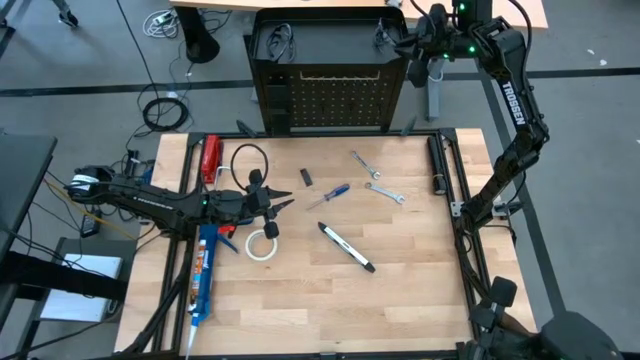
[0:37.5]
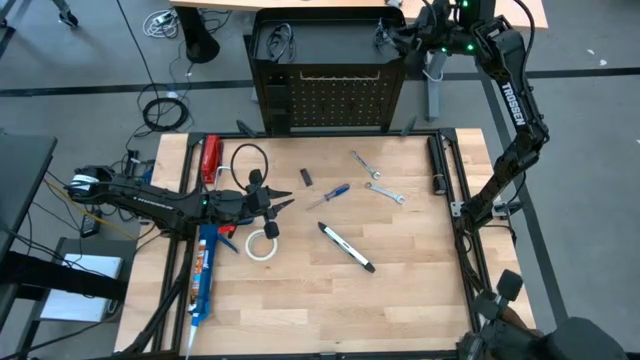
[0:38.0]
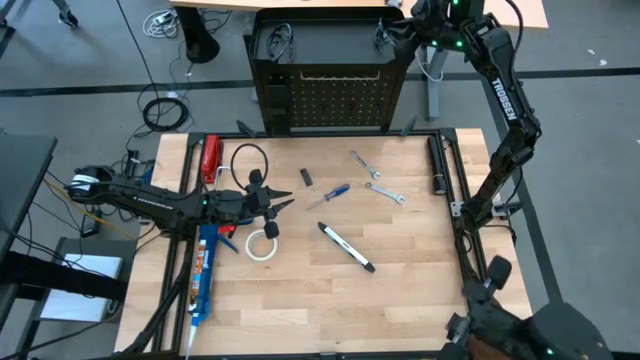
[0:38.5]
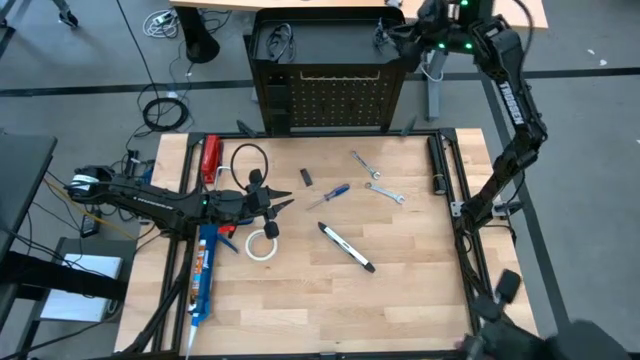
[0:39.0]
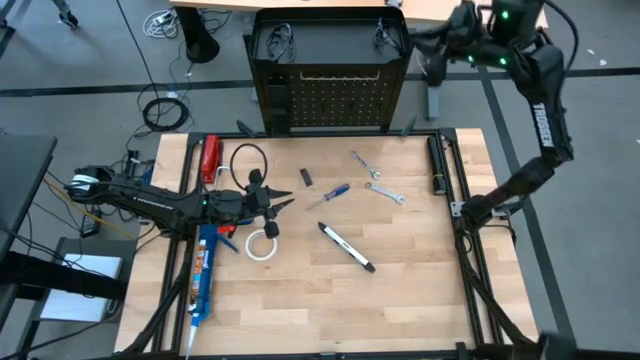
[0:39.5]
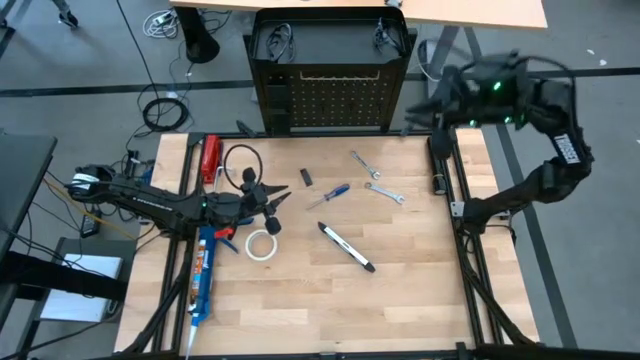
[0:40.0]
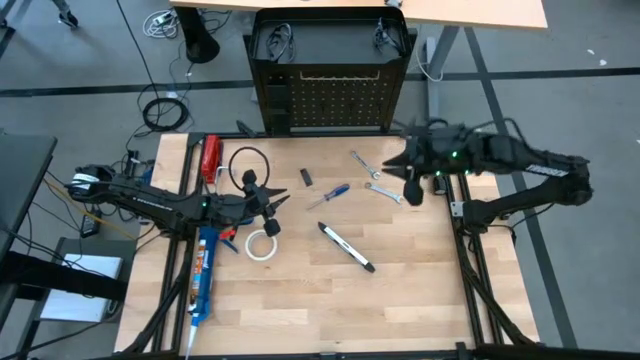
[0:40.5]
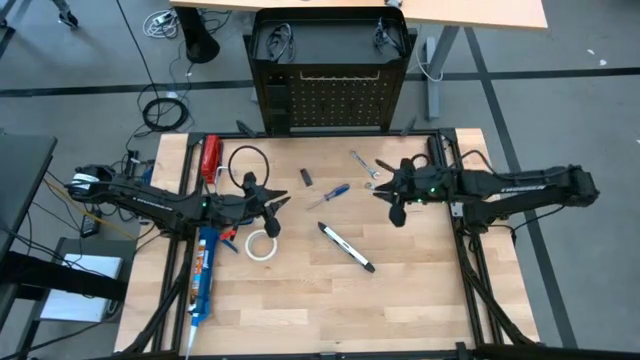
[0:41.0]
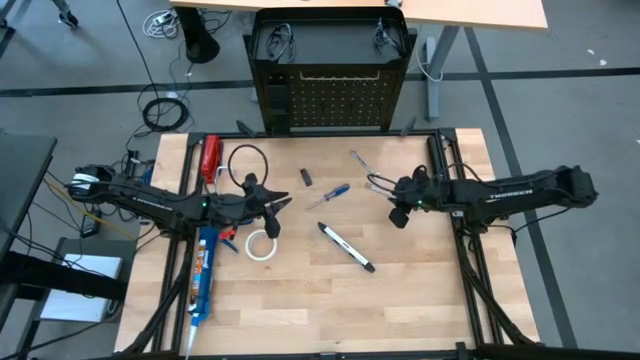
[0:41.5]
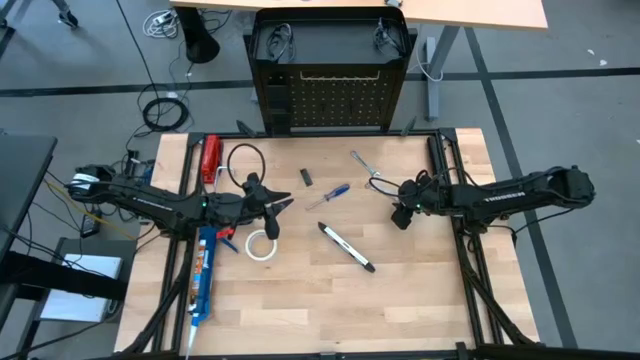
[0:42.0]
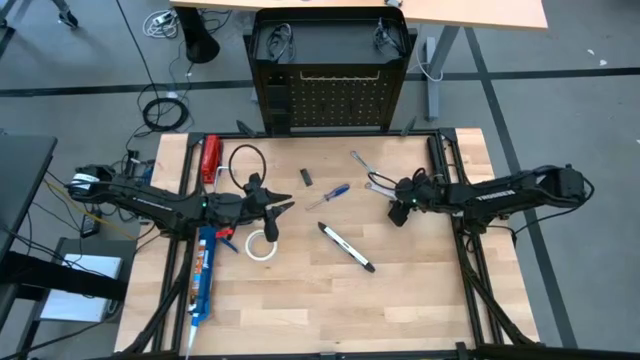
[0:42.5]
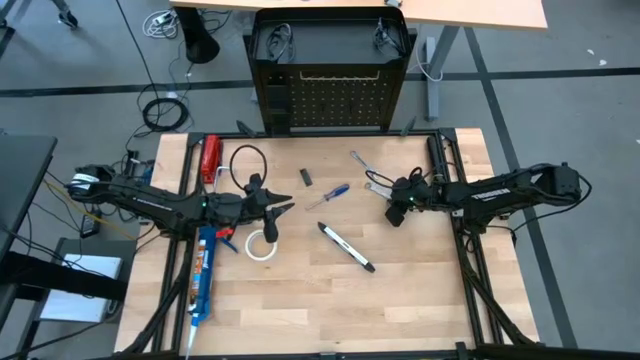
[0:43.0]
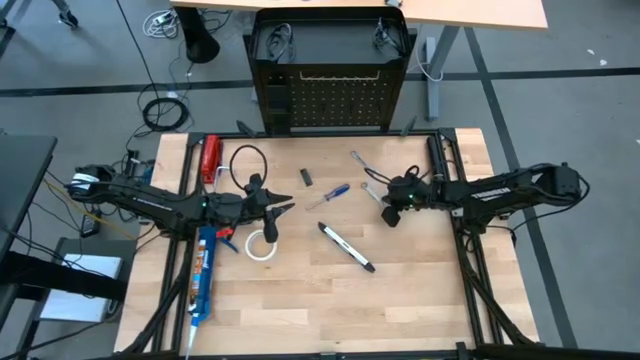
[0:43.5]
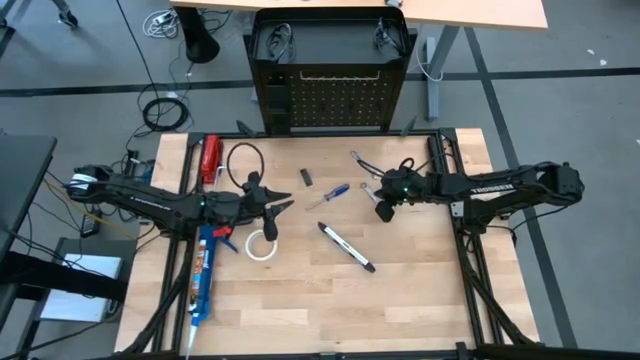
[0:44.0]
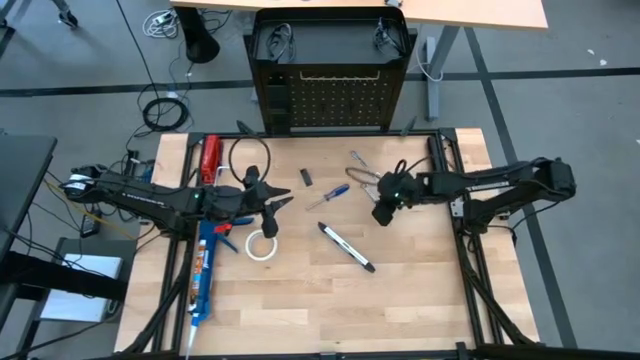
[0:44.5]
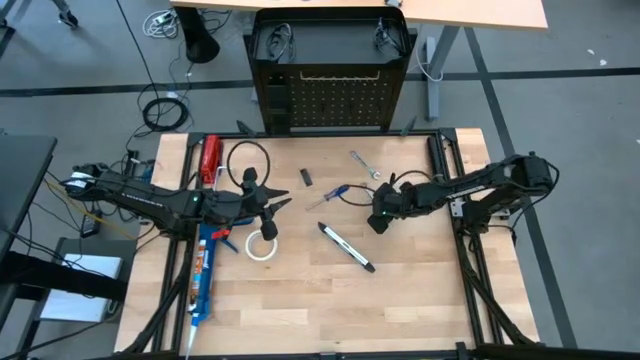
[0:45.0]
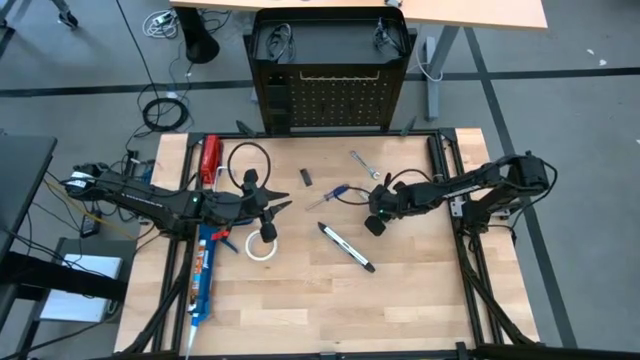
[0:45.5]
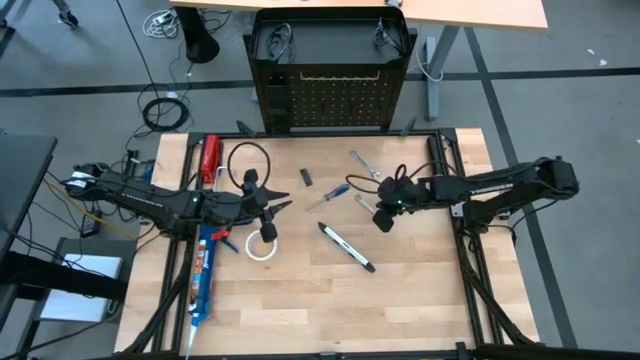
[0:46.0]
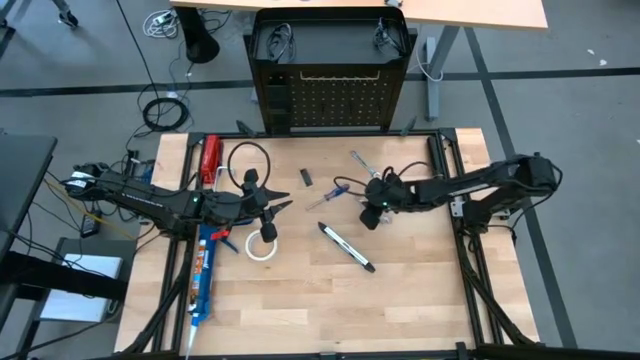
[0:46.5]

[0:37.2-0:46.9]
Task: Hang tools onto peg board
Hang the bottom wrench onto the black pegboard

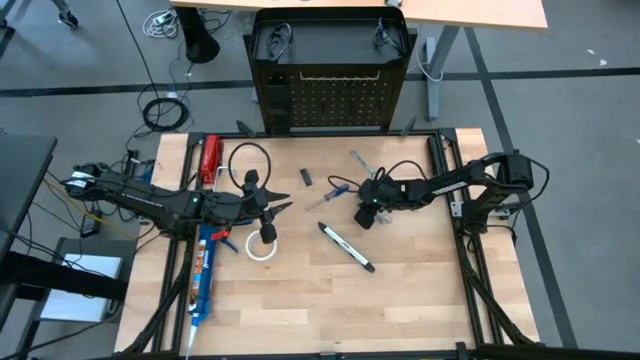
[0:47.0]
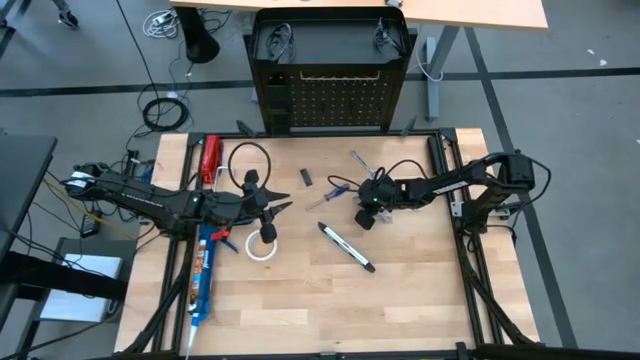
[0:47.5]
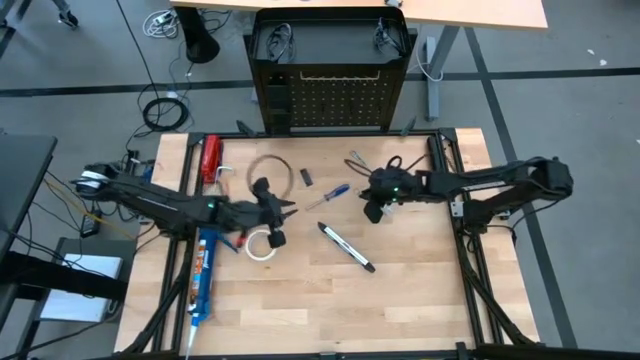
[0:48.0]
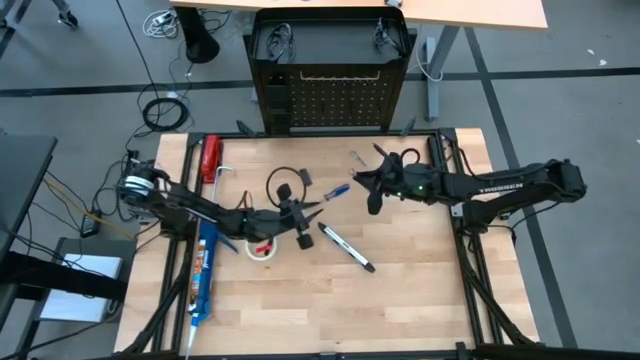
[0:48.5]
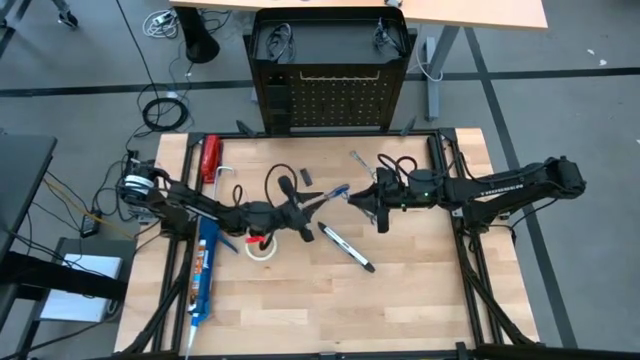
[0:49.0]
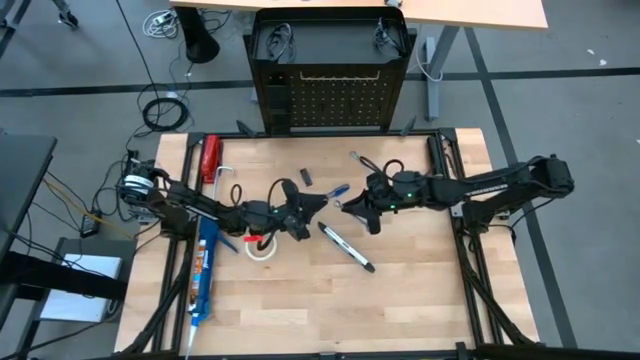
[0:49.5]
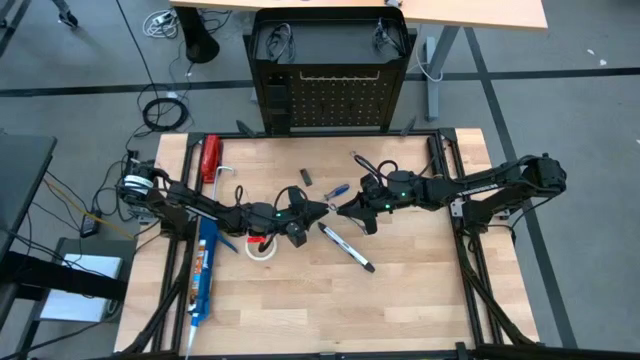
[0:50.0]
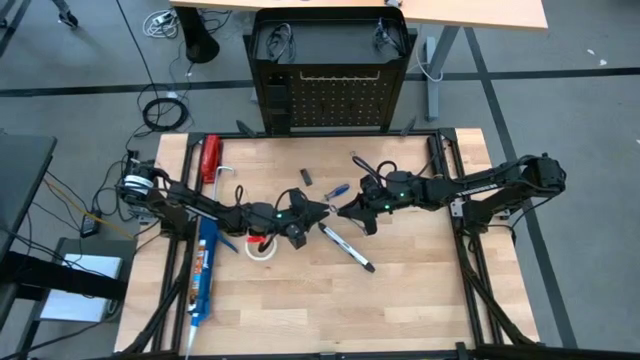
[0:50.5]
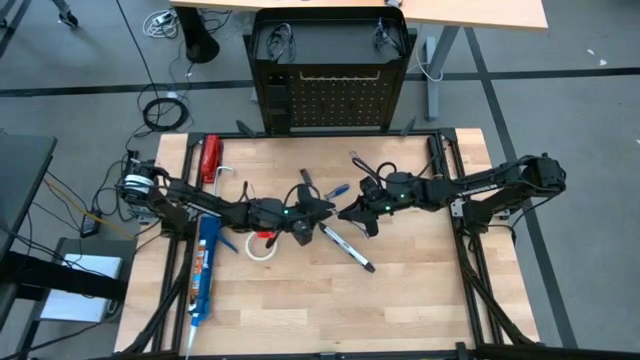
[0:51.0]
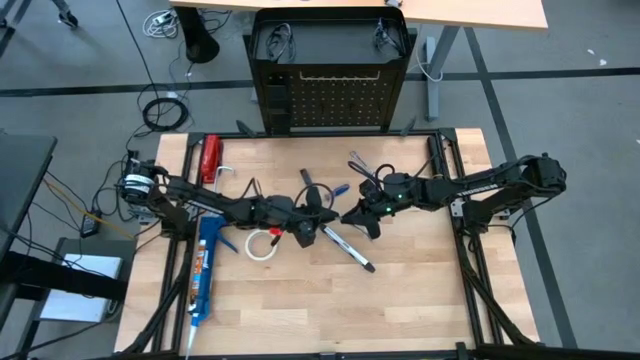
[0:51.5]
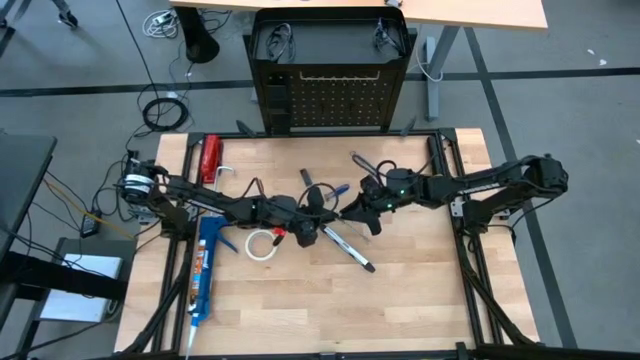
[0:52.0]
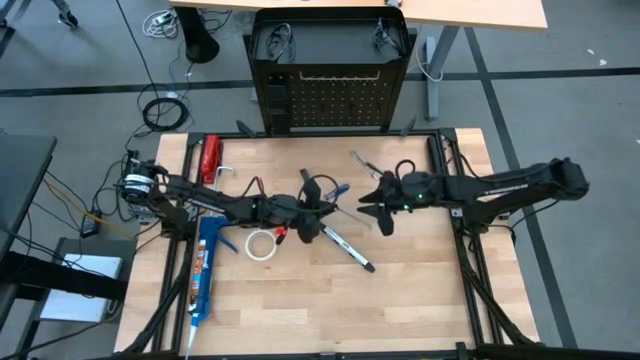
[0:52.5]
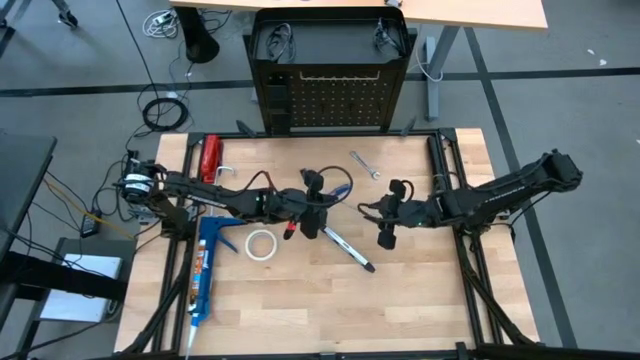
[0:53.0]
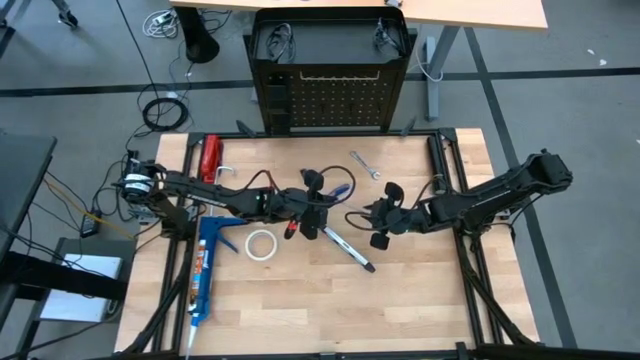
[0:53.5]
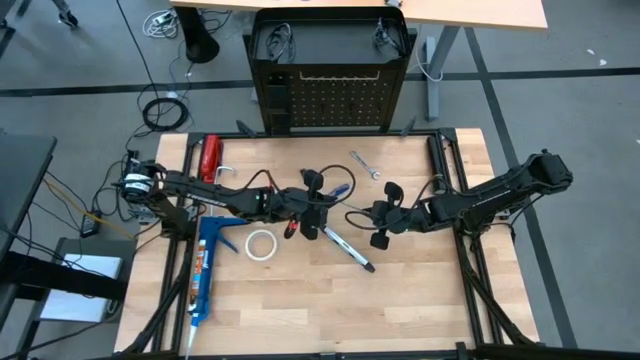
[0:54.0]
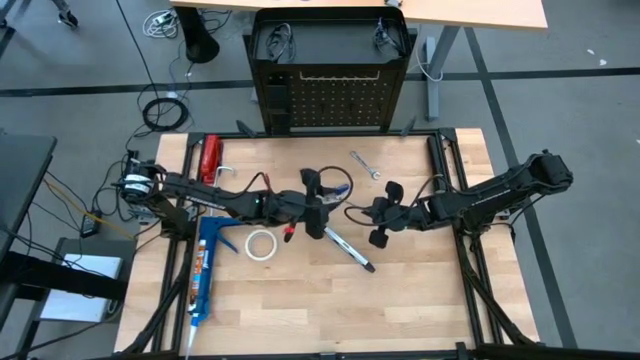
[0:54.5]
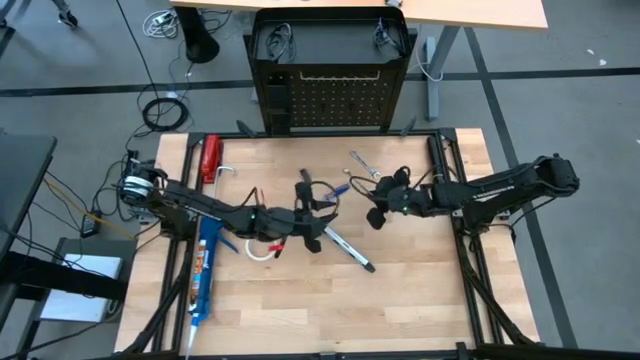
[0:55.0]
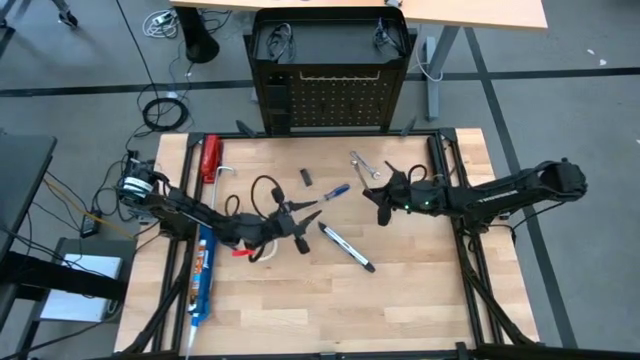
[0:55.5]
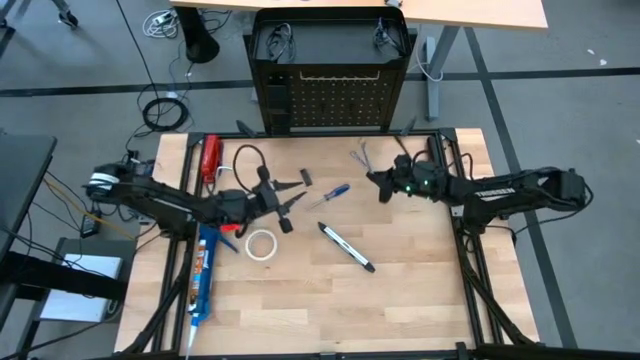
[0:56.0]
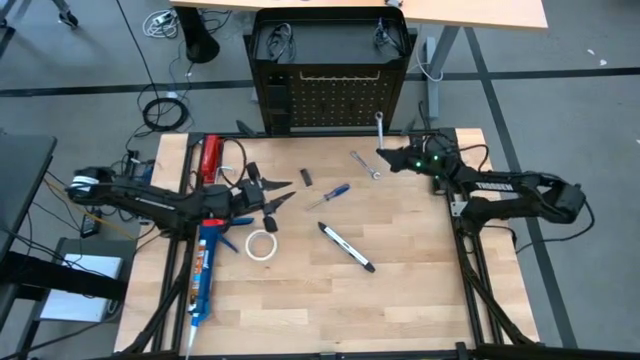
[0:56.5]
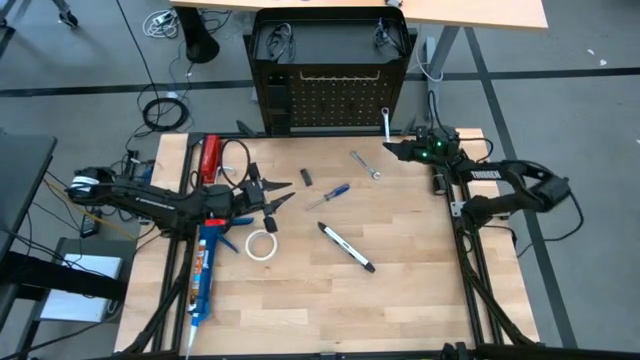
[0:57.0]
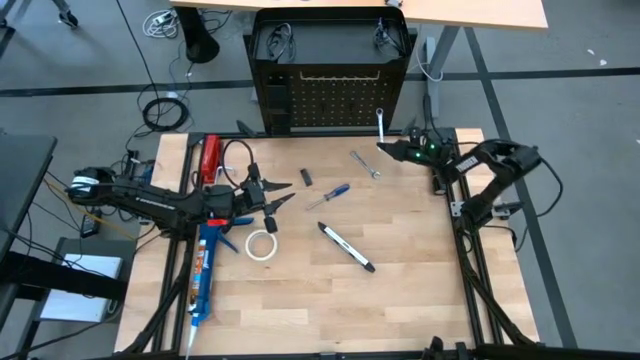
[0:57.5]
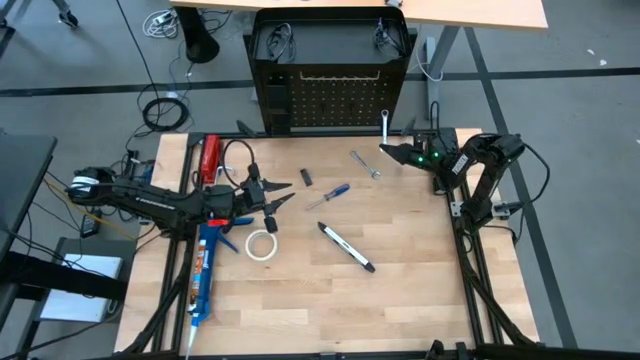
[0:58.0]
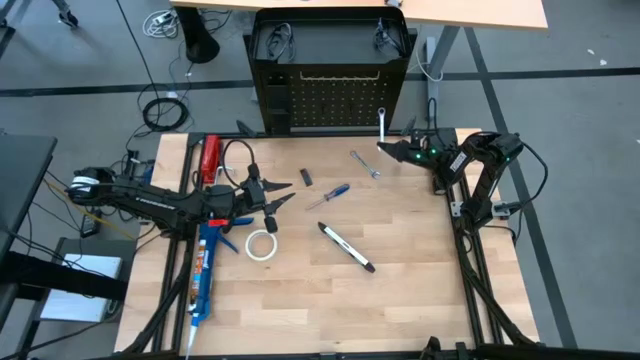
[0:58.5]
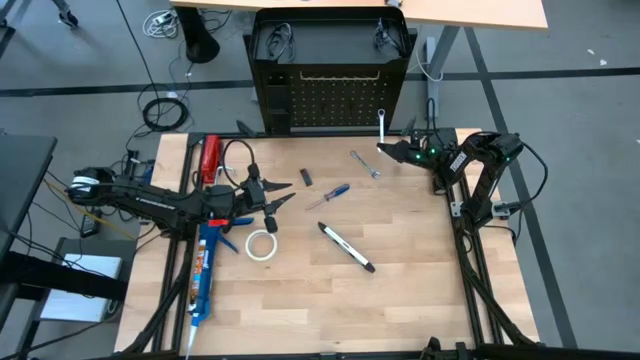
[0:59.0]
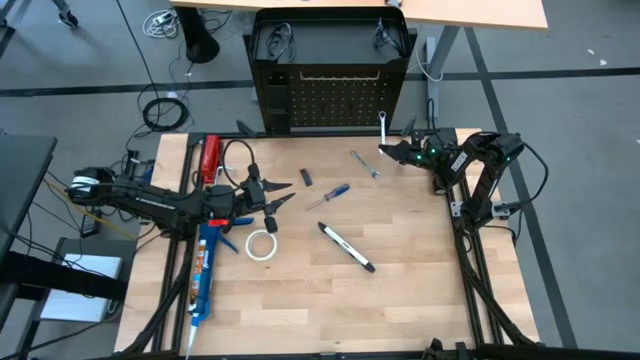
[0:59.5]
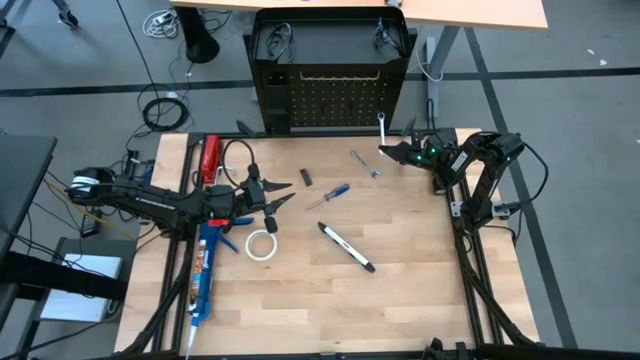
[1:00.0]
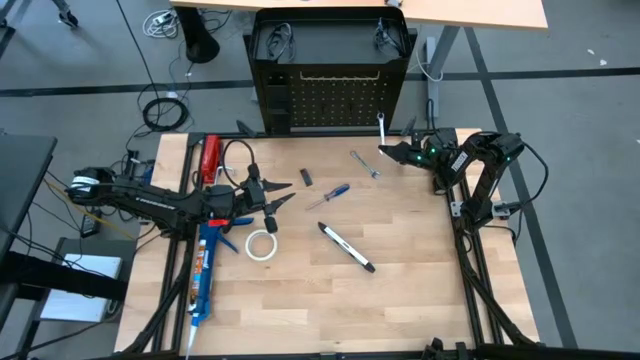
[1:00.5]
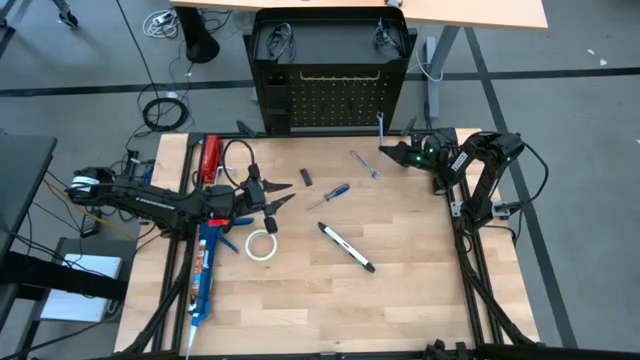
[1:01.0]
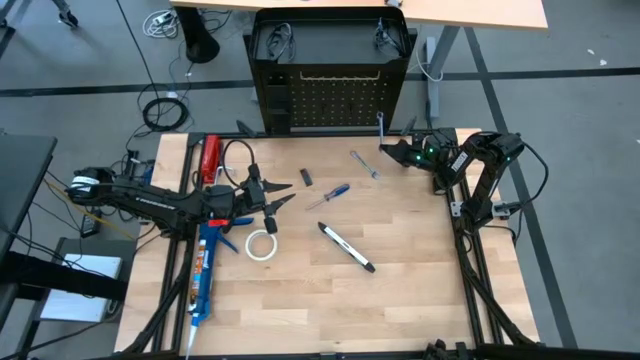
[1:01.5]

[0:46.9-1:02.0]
Hang the bottom wrench onto the black pegboard
